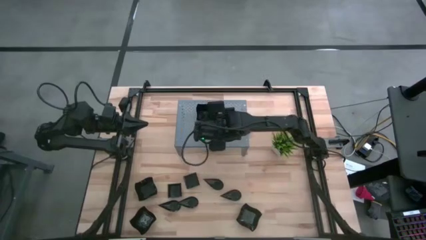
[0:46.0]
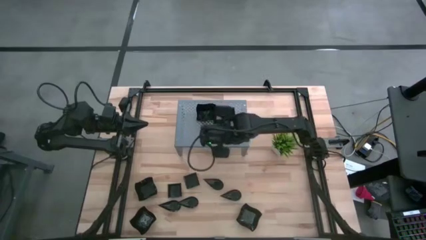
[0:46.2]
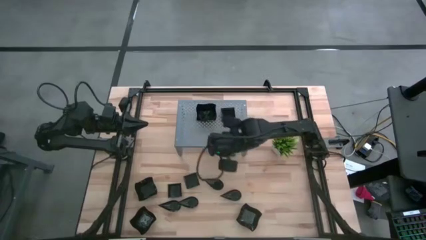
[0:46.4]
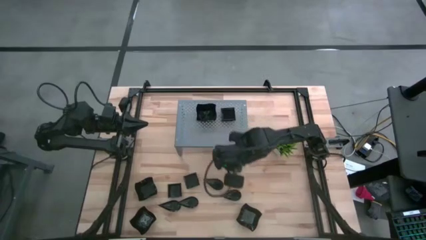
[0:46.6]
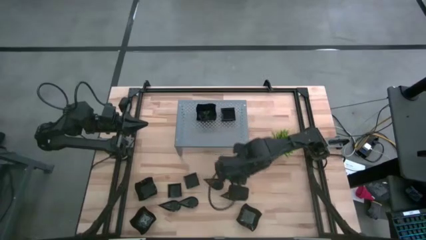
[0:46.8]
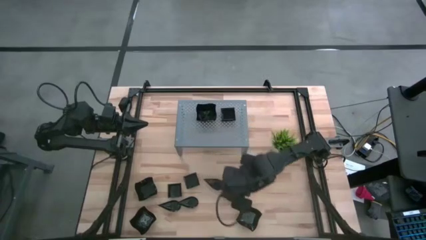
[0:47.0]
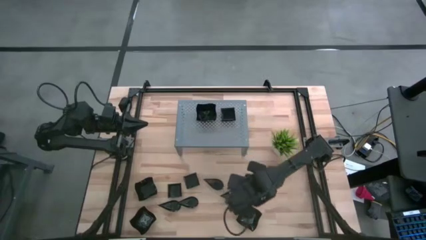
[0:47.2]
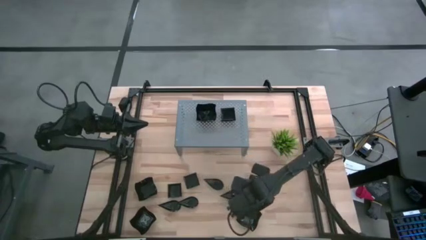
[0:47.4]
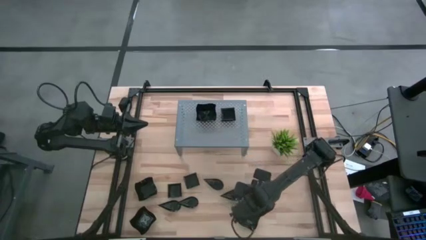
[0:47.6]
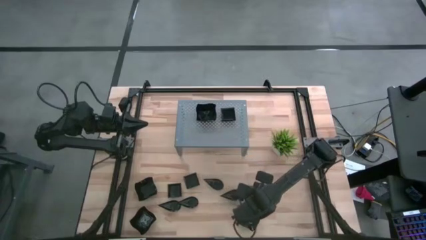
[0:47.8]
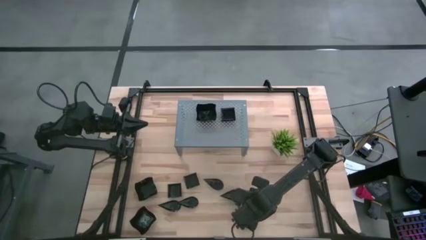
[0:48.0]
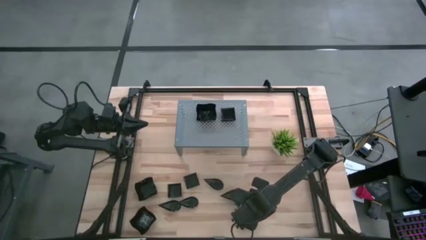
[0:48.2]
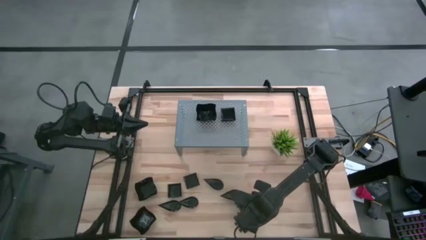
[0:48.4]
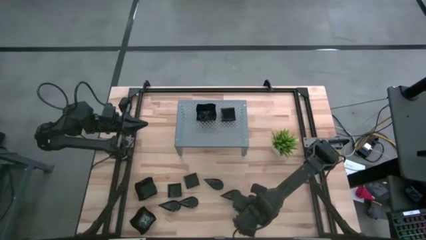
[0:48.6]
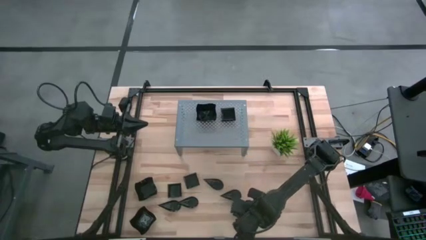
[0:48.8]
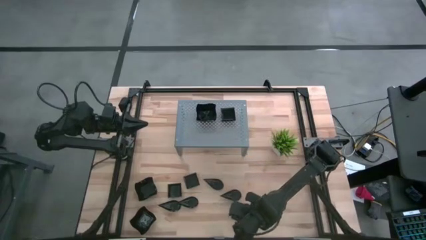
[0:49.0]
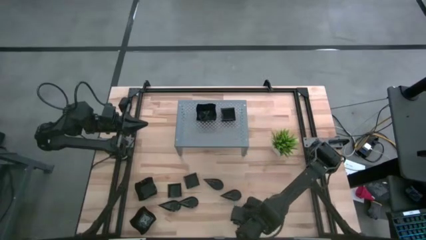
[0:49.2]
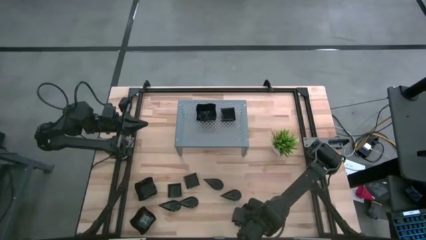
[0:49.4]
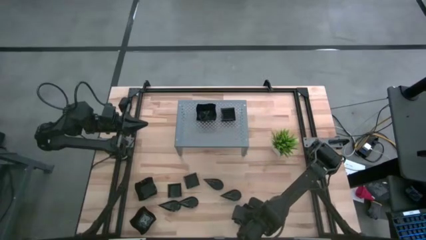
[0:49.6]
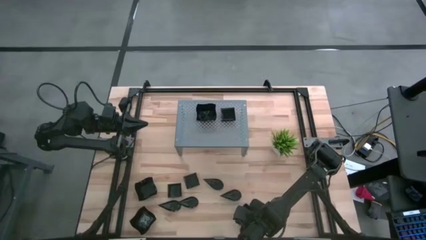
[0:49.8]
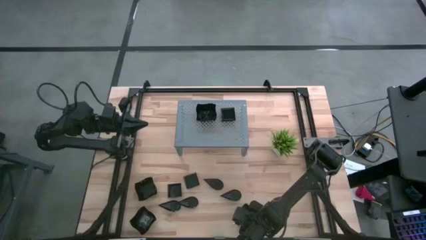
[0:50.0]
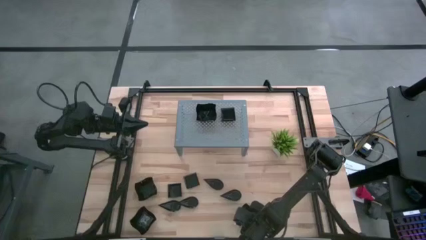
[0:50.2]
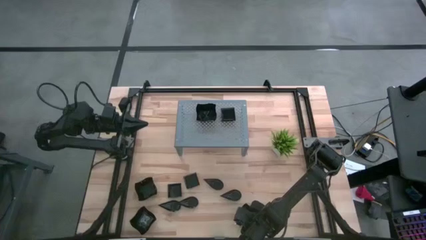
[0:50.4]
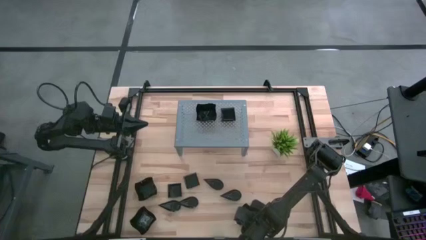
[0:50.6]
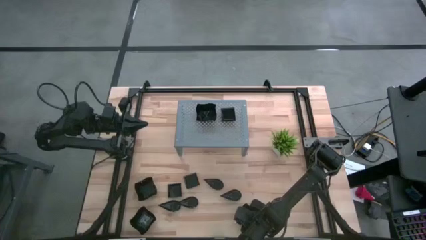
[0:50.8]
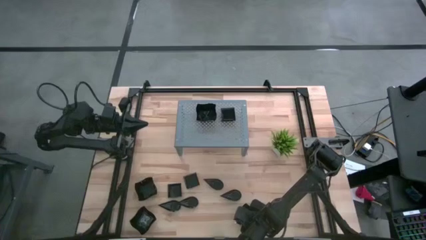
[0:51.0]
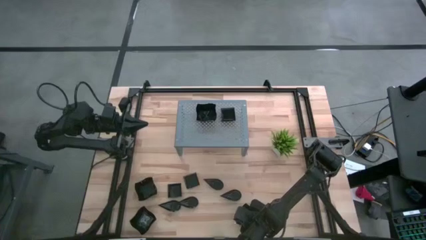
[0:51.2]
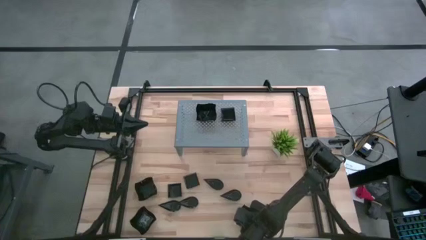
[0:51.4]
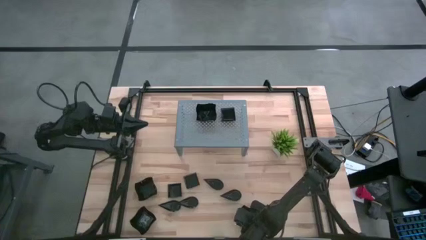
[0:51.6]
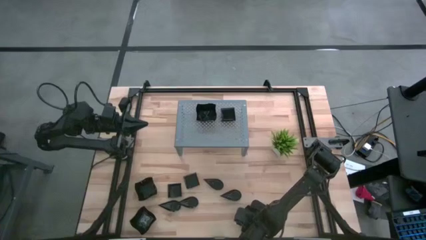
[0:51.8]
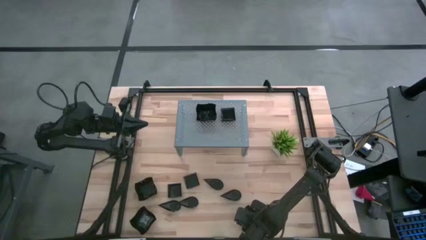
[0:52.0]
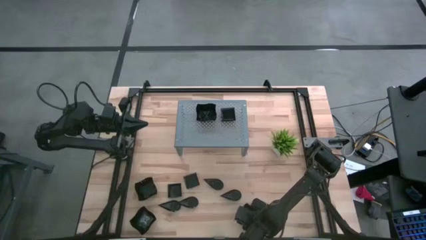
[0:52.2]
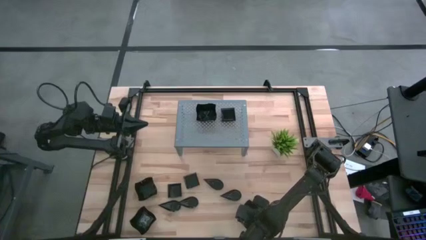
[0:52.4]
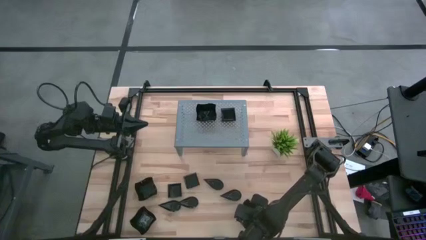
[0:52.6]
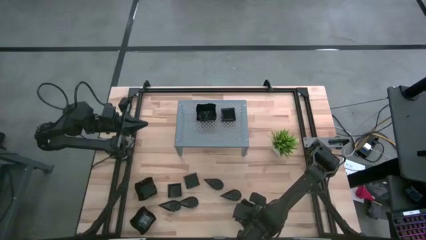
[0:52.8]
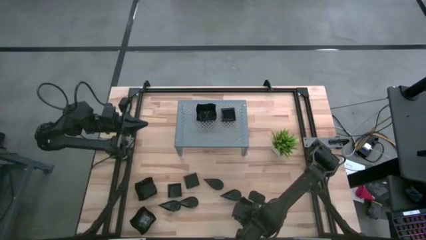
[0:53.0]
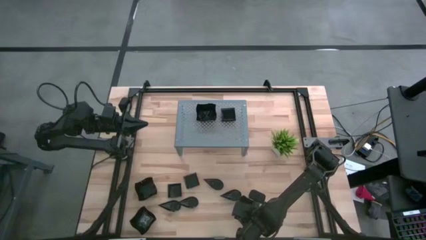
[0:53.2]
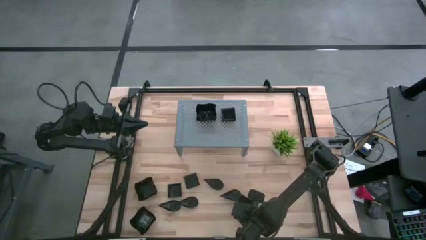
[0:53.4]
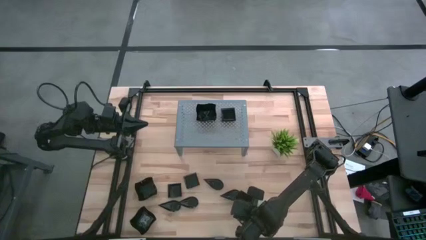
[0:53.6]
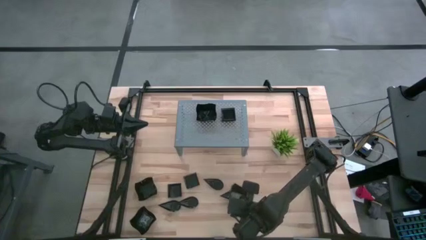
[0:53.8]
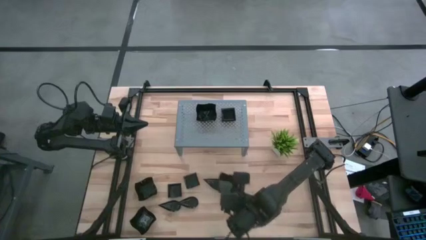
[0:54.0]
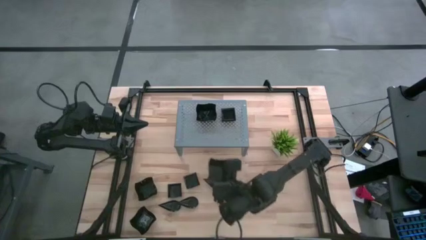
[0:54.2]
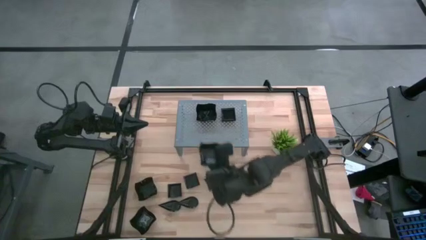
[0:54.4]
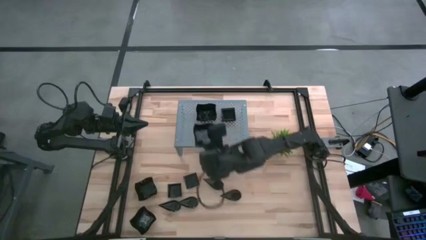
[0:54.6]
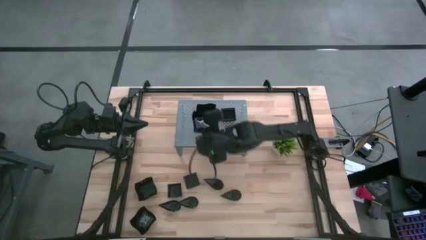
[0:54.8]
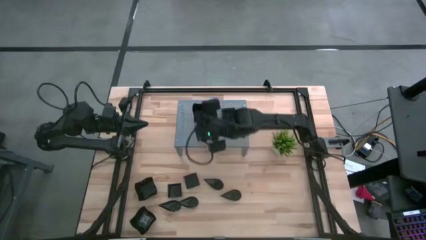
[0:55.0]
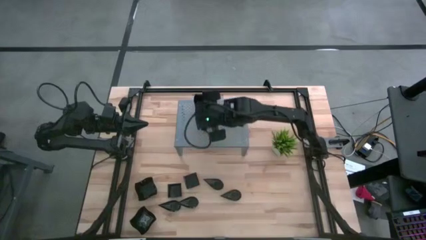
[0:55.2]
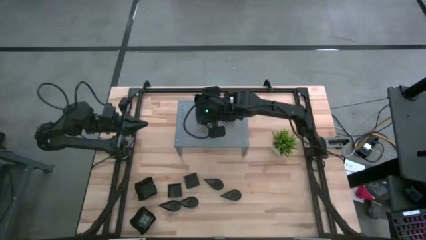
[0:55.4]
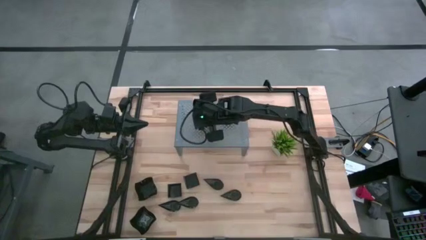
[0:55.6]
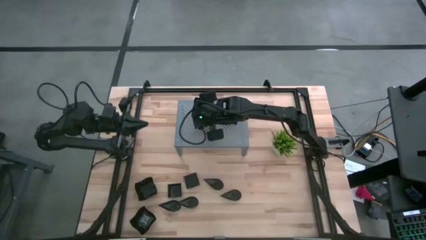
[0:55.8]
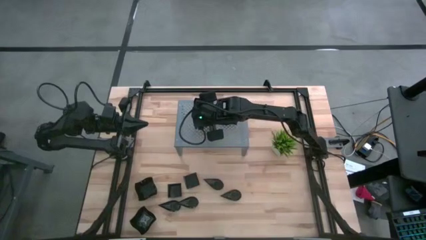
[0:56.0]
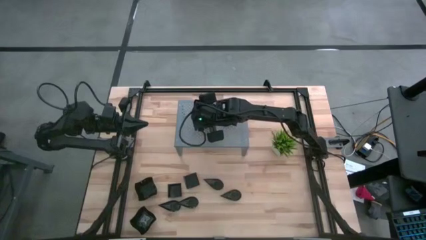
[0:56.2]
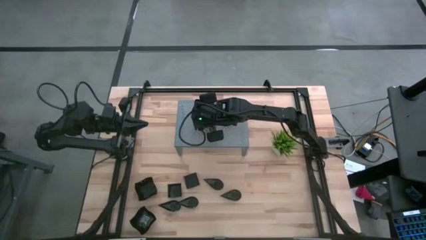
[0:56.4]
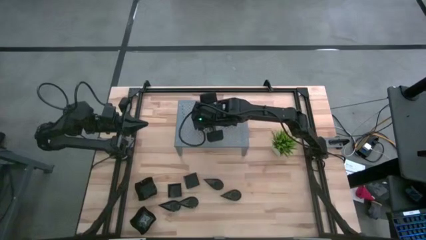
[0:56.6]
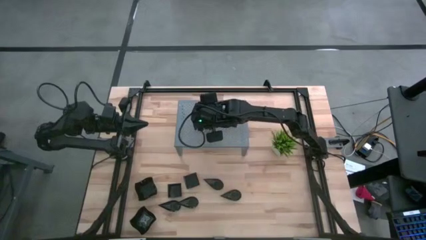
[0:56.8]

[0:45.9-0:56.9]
Task: Pick & Place Mini shaped plates
Stack the distorted square plate on top of the distorted square plate on the shelf

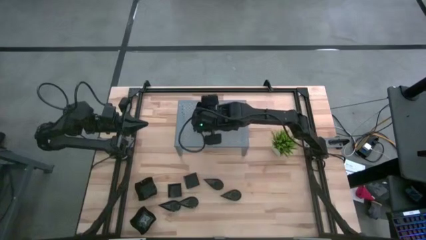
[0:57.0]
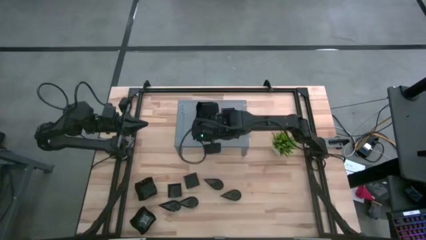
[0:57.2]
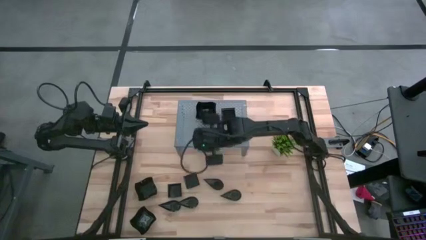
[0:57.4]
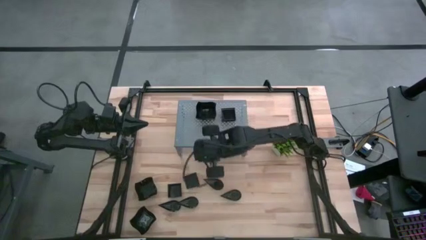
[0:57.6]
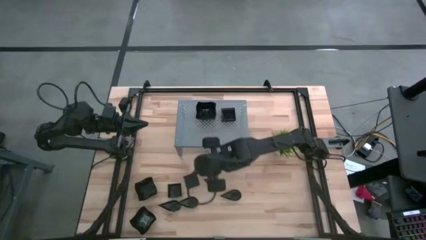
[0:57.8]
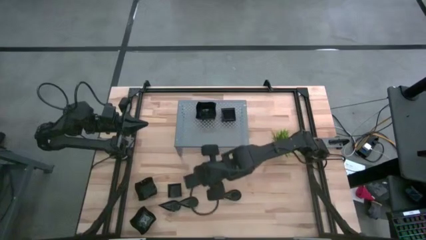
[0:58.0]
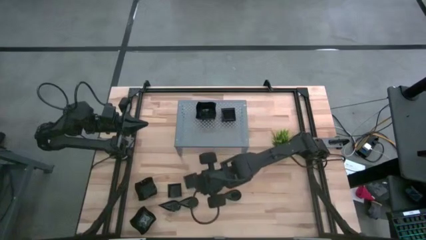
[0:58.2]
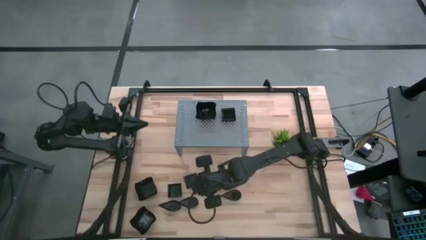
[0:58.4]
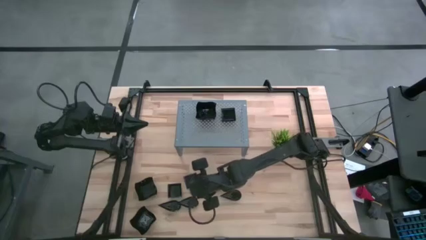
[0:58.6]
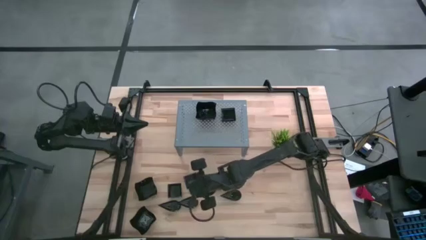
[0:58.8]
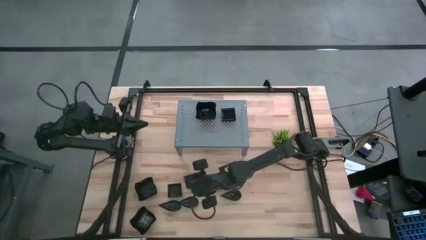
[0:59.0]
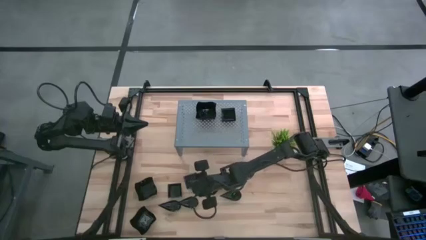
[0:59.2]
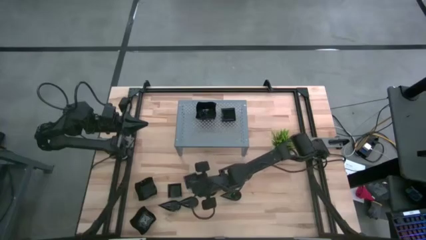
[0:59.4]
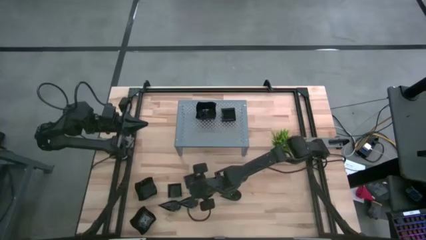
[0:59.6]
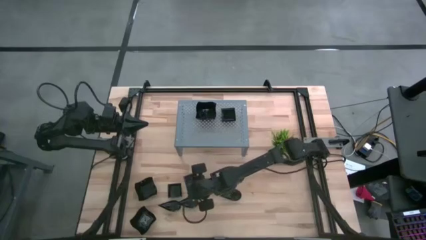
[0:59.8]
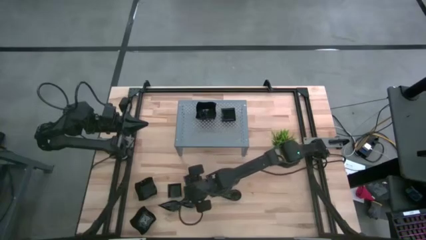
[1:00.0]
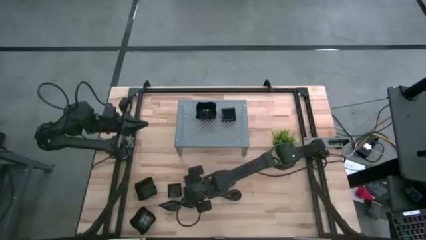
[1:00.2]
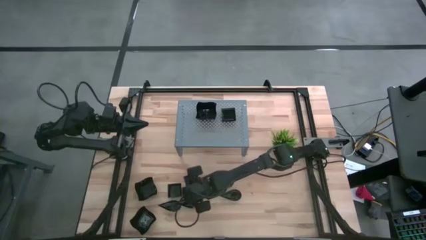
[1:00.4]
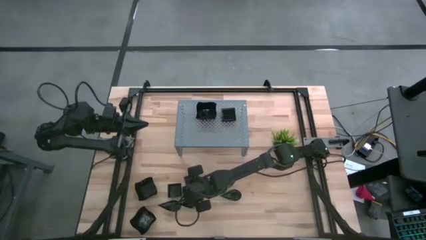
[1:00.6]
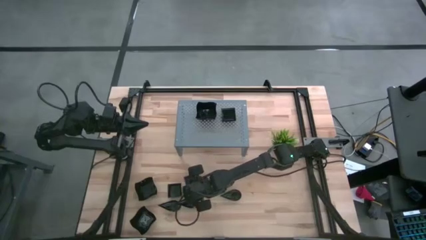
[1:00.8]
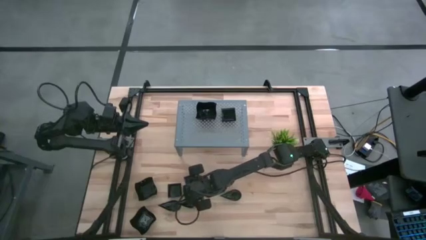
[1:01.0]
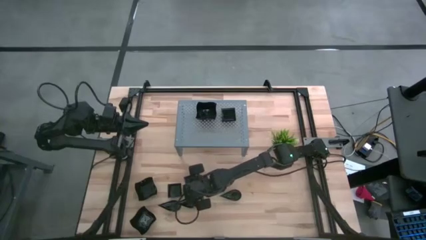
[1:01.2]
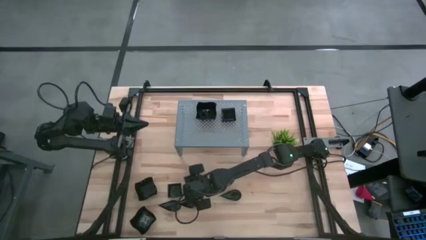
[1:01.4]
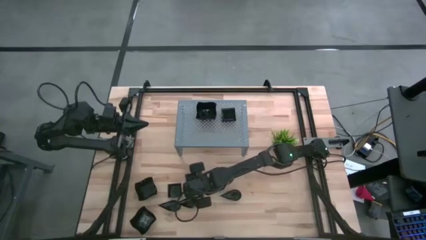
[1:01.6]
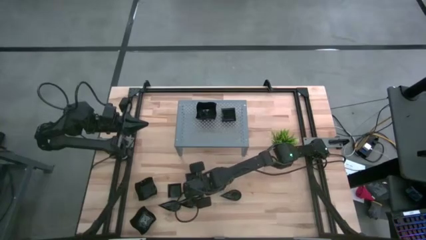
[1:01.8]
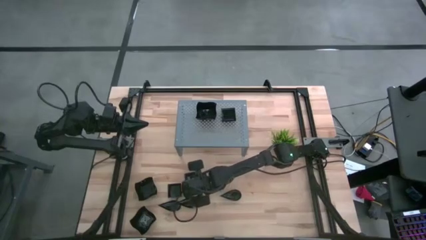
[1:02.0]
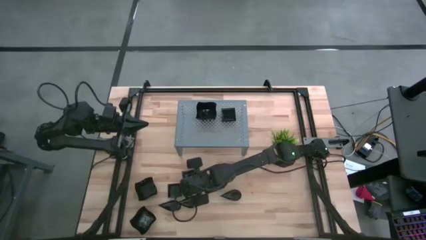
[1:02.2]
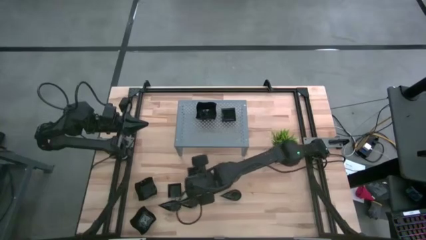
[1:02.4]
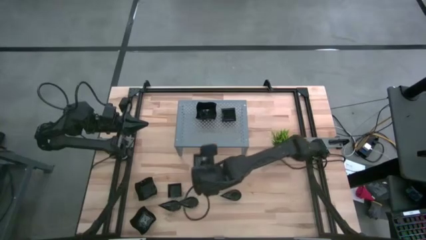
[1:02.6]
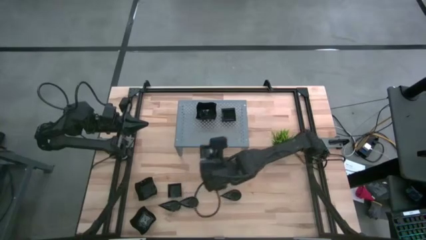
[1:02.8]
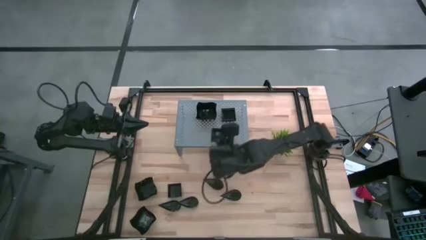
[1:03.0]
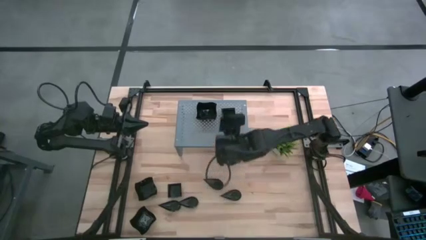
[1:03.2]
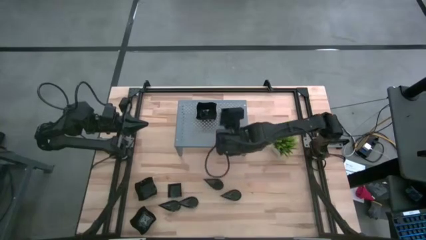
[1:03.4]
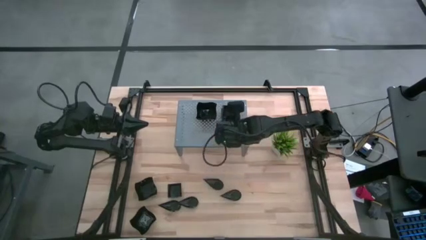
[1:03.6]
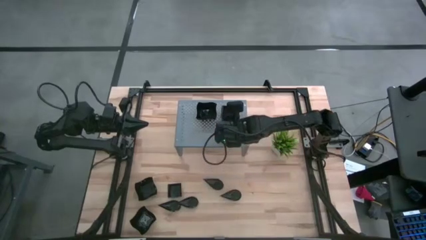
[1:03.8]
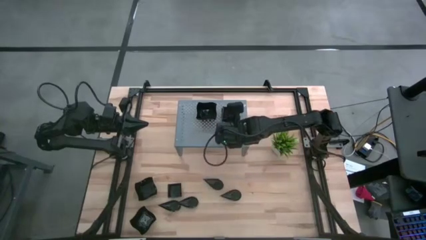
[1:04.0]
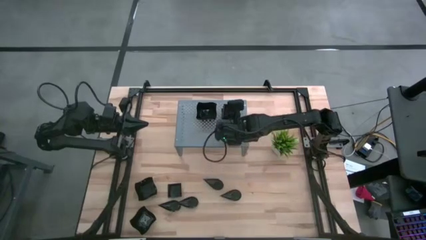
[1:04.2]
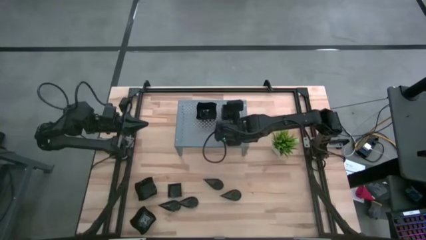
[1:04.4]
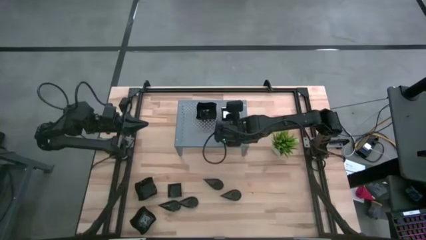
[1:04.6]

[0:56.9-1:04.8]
Stack the square plate on top of the square plate on the shelf
